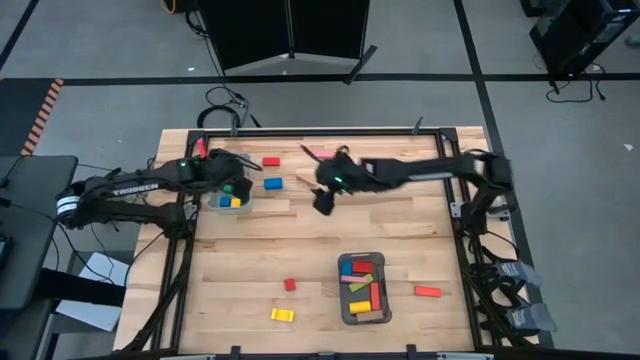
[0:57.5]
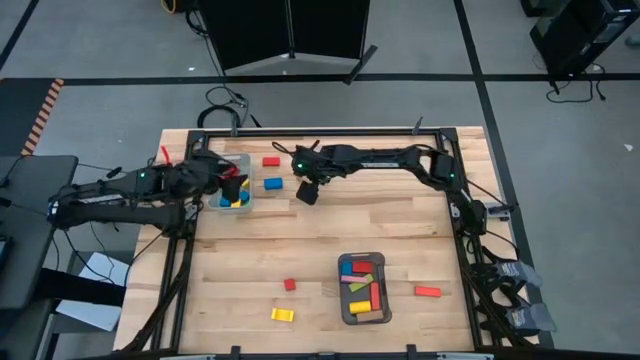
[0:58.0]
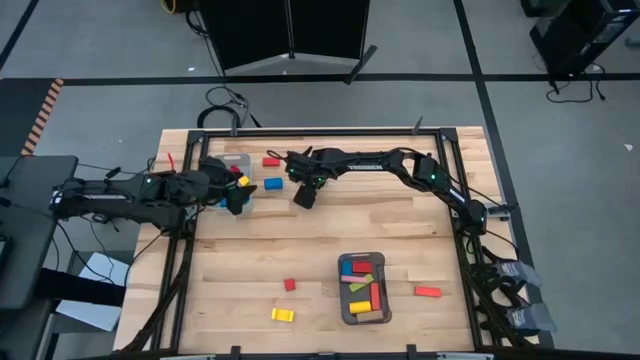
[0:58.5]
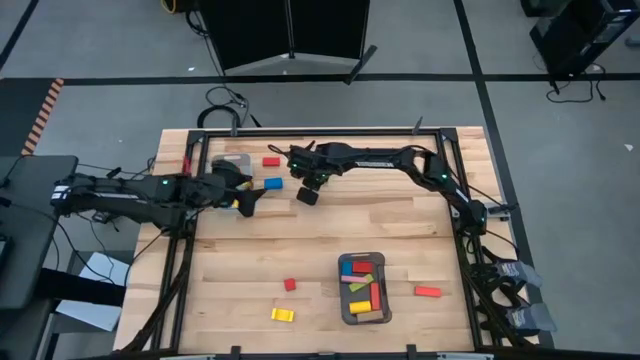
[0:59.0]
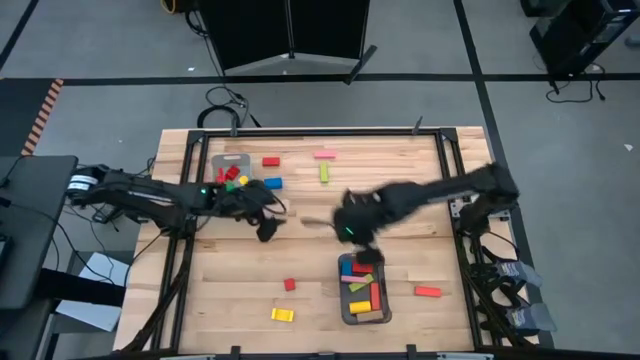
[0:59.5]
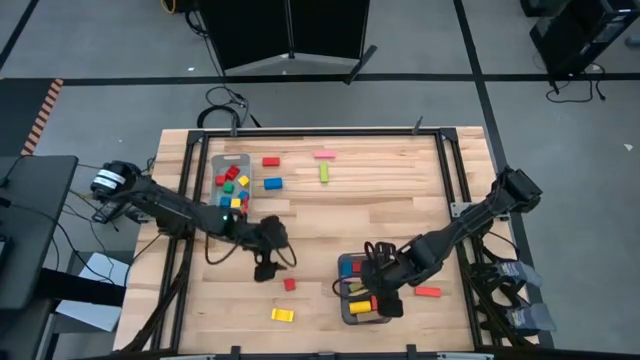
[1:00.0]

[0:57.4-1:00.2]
Task: Sort blocks by size
Put the brown rectangular block into the black bin

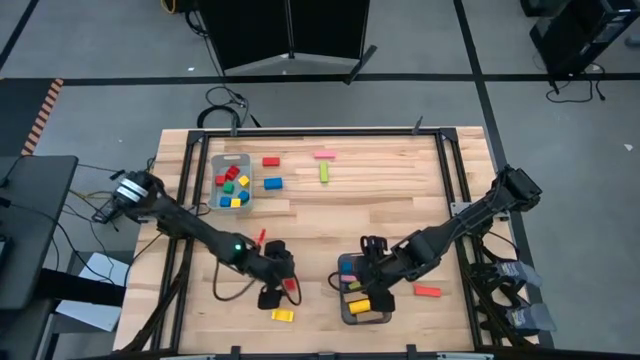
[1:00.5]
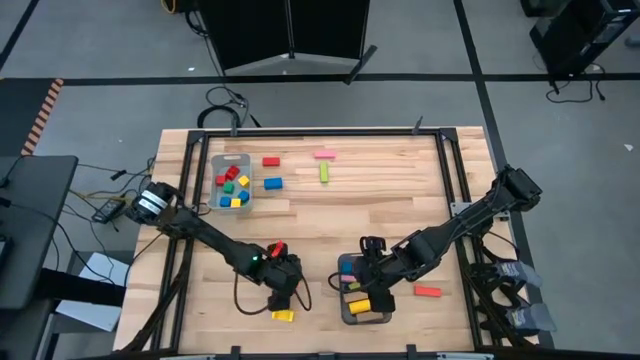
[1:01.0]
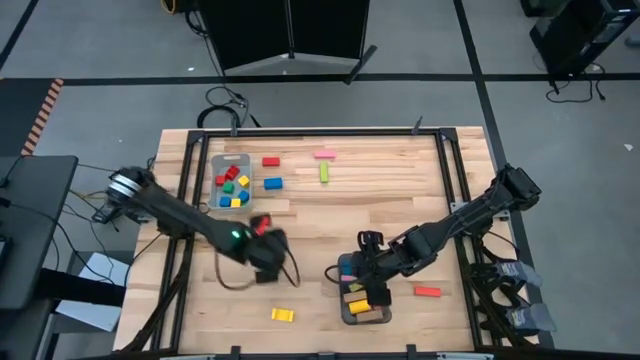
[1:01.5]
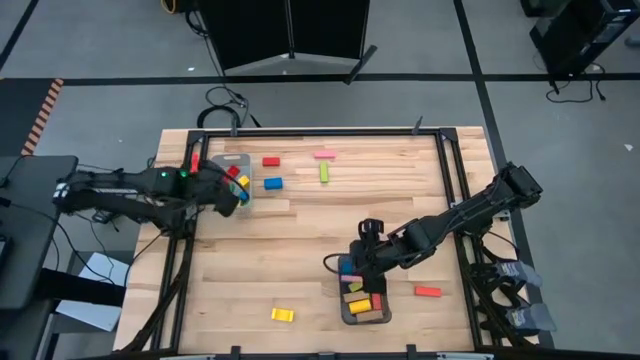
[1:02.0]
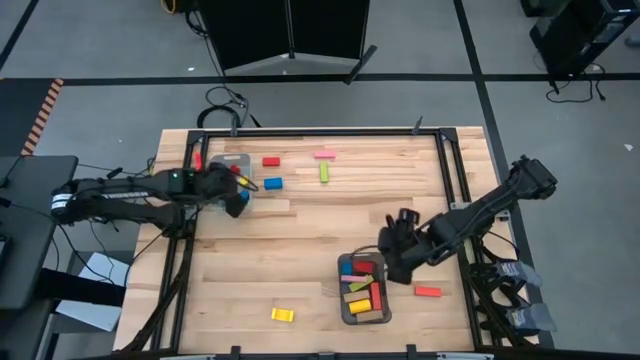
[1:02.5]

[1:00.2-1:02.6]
Put the red cube block into the gray bin

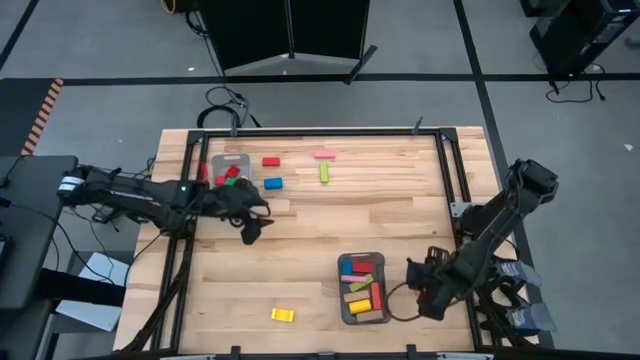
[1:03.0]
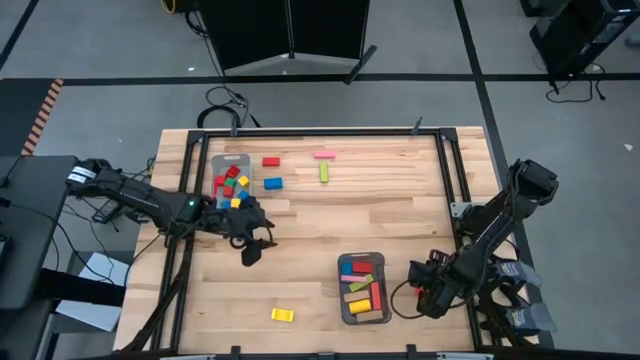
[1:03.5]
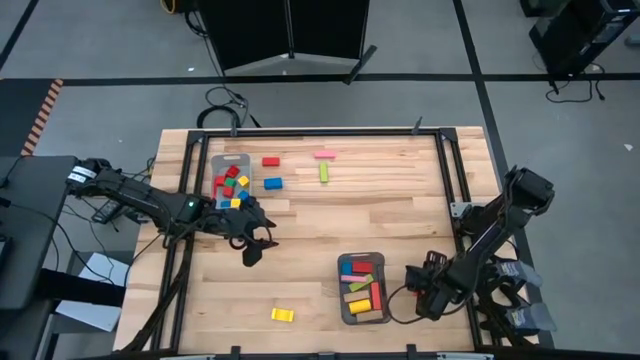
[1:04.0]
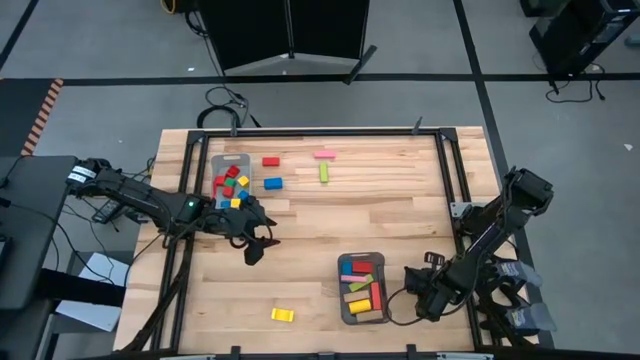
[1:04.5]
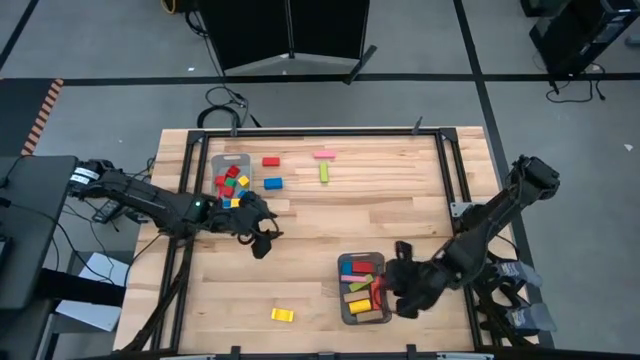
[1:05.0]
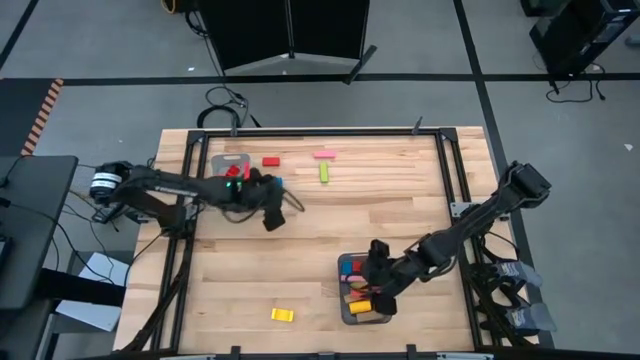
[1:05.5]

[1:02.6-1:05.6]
Put the orange rectangular block into the black bin

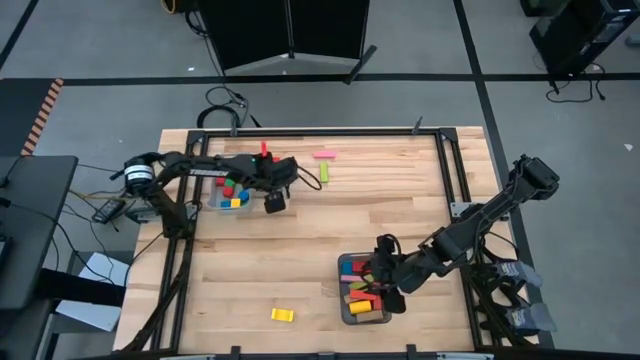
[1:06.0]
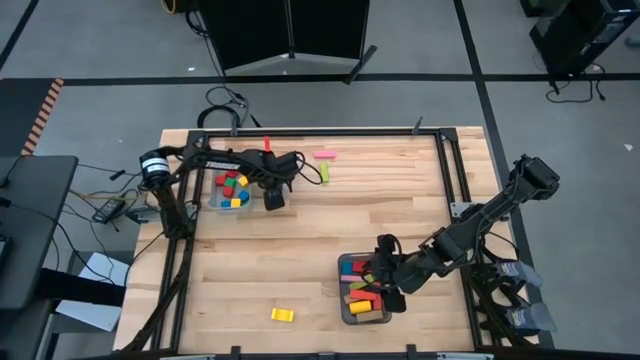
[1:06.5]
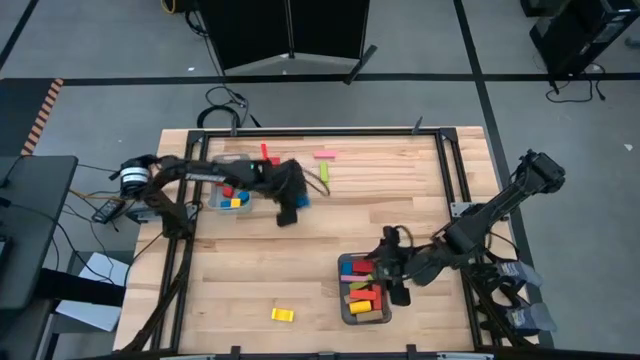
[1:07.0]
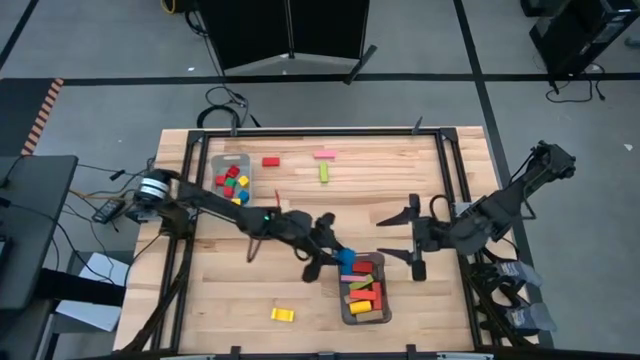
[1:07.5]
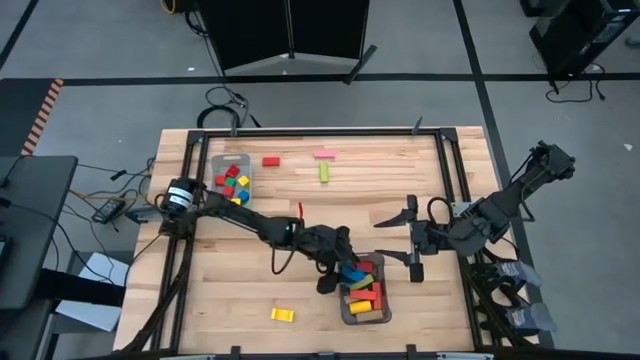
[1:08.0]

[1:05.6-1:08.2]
Put the blue rectangular block into the black bin

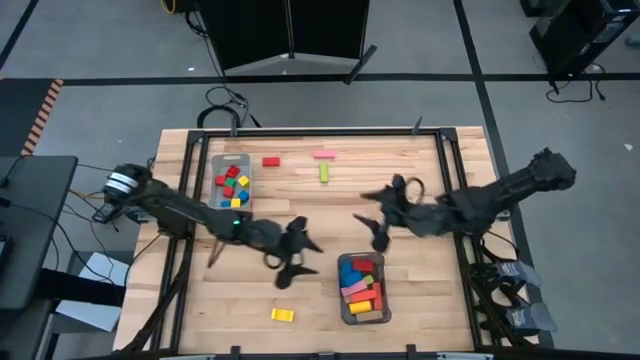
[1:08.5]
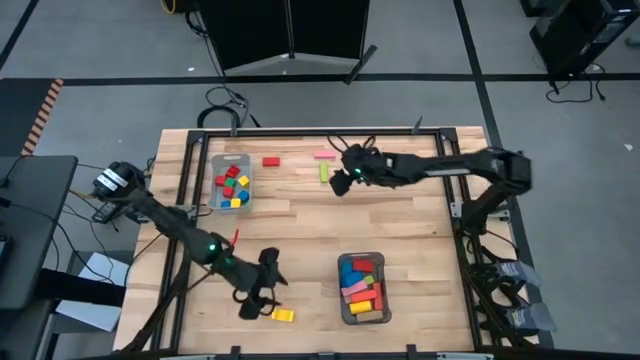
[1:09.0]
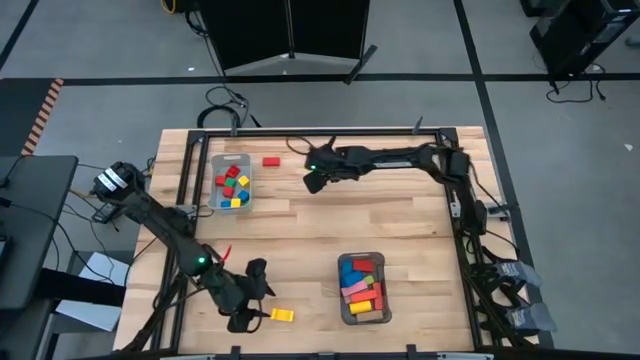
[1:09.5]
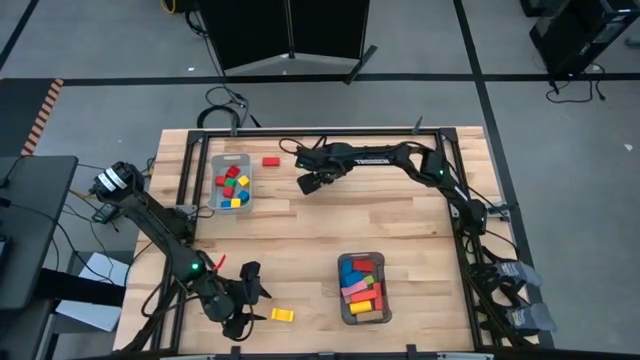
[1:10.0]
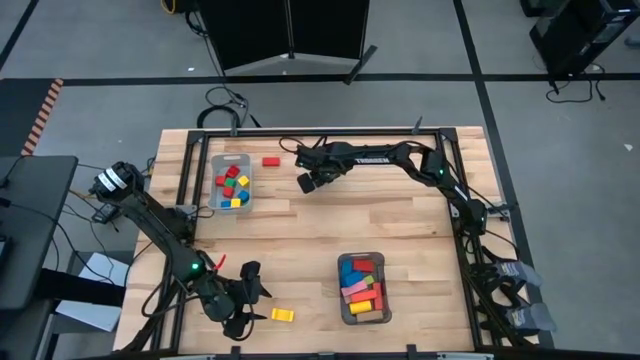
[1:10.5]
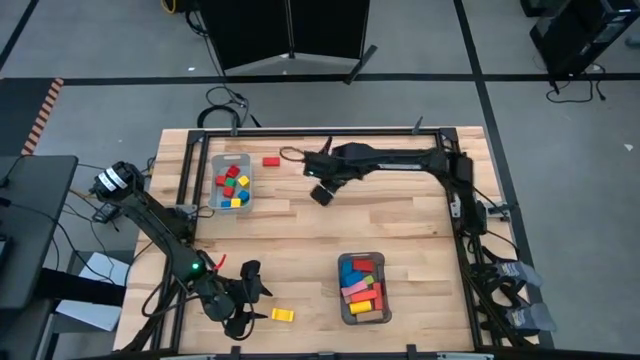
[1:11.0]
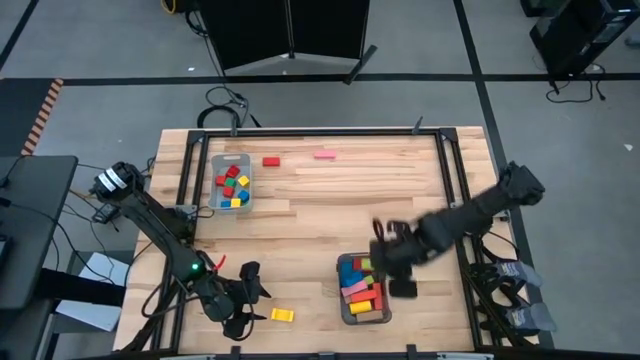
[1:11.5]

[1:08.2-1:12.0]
Put the green rectangular block into the black bin

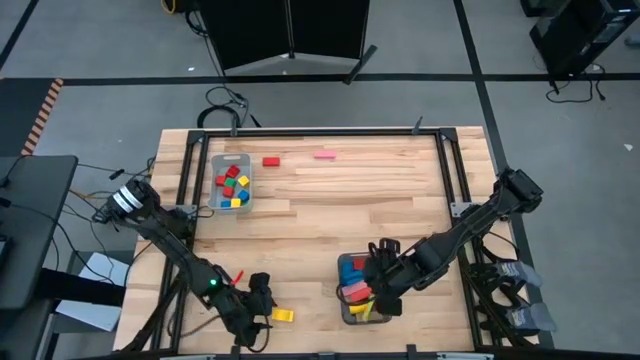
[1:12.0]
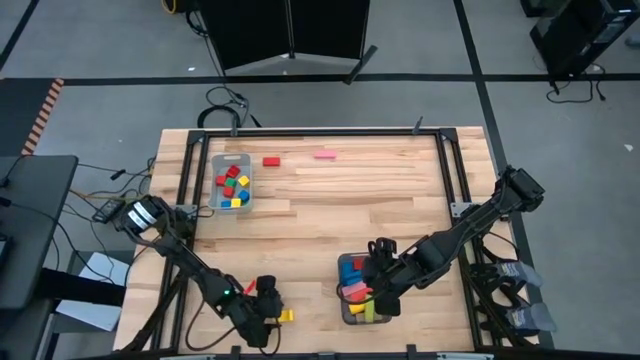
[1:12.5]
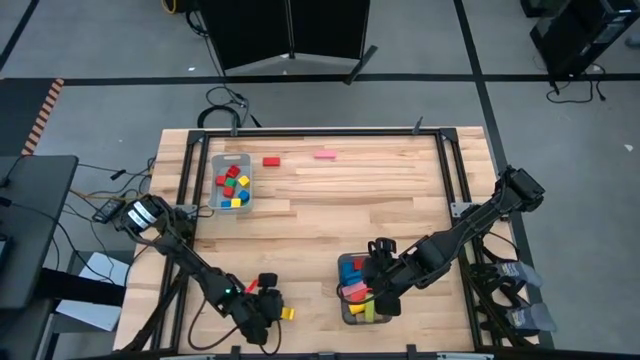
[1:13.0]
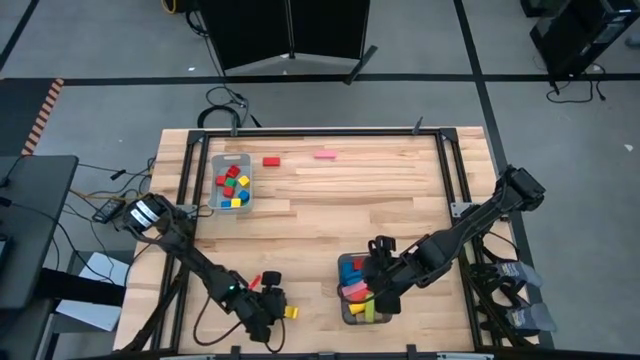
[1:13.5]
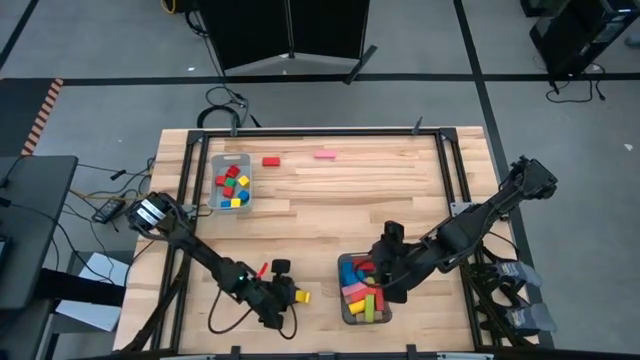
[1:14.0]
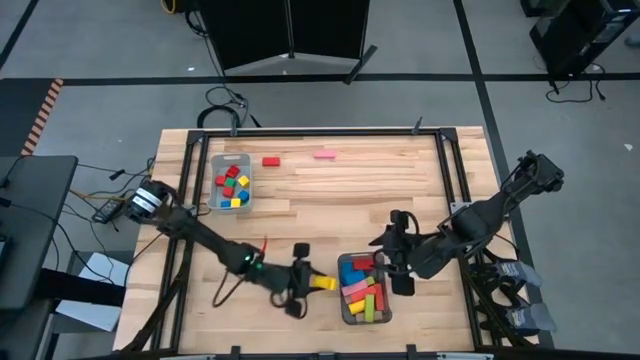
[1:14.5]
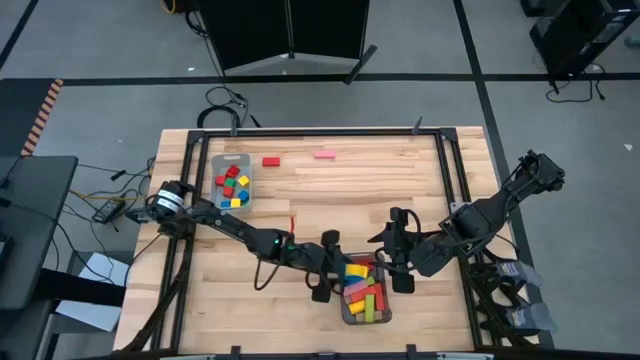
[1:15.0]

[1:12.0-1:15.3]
Put the yellow arch block into the black bin

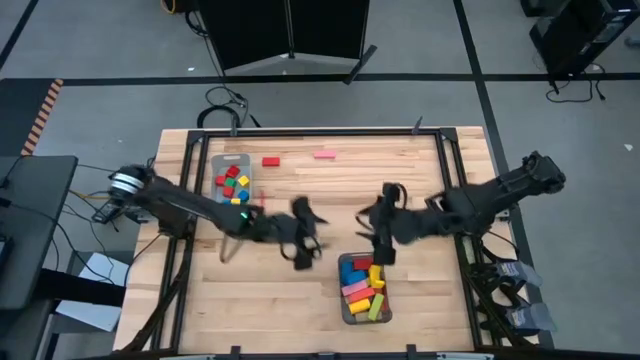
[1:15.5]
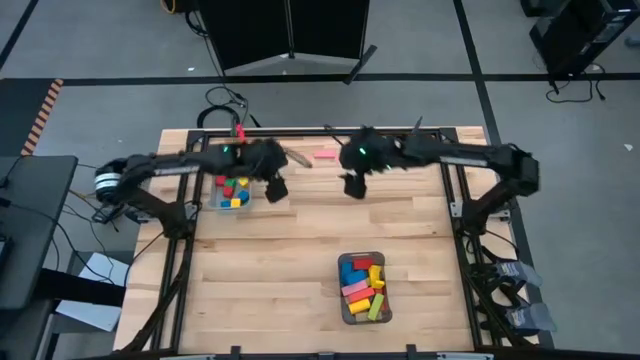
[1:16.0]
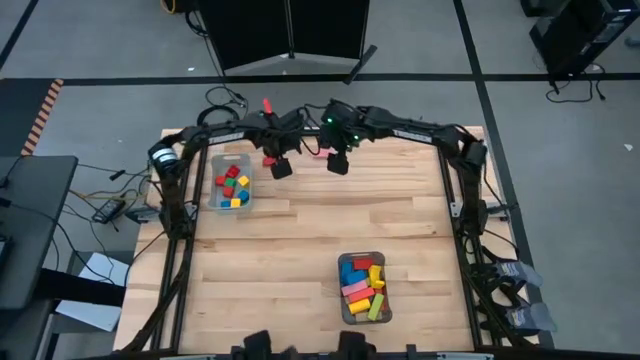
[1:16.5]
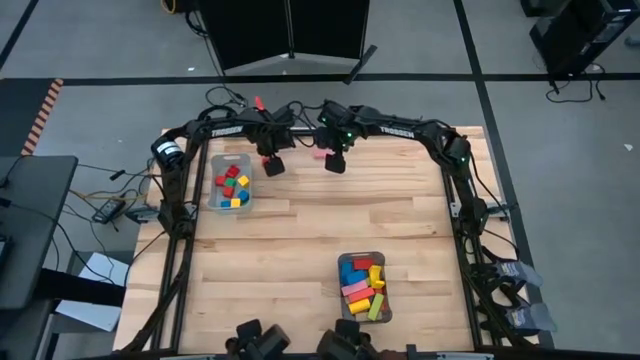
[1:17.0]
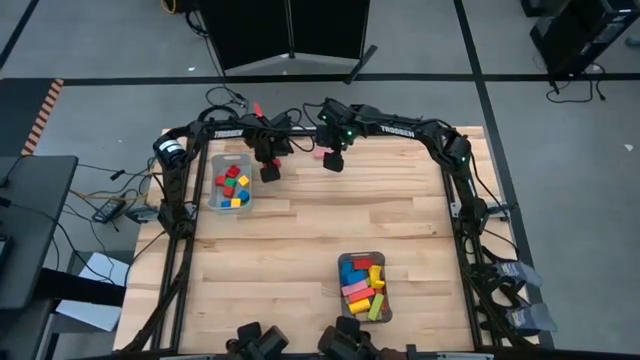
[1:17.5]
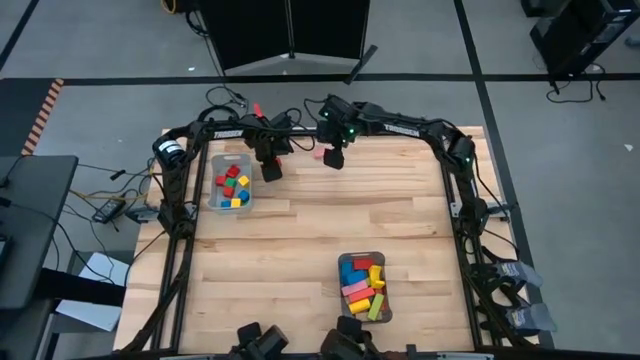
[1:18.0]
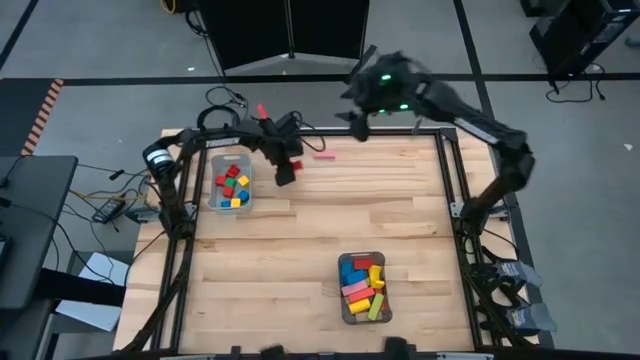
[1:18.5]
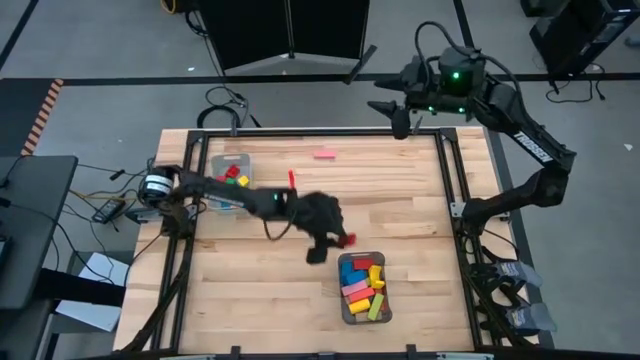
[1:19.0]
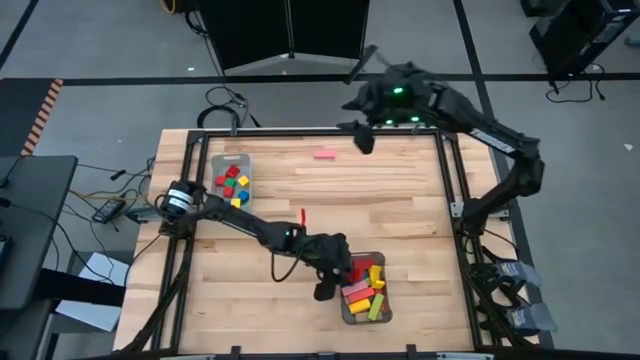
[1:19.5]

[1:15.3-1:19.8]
Put the red rectangular block into the black bin

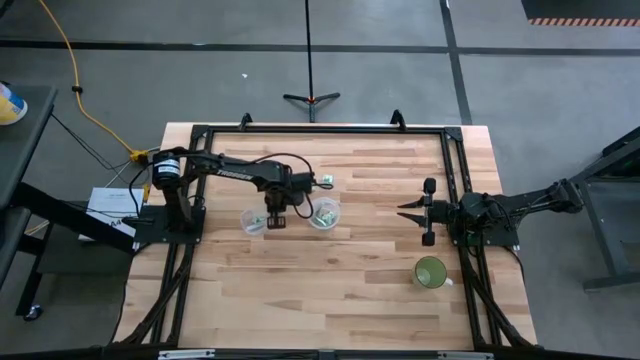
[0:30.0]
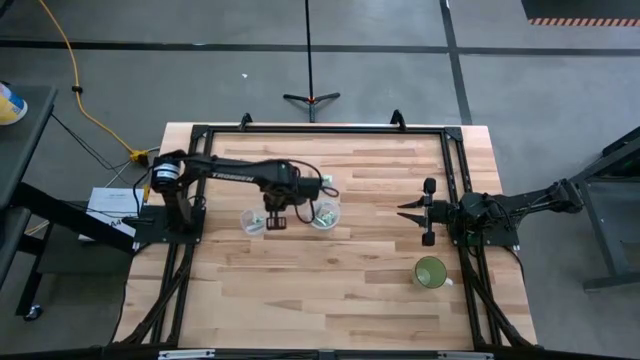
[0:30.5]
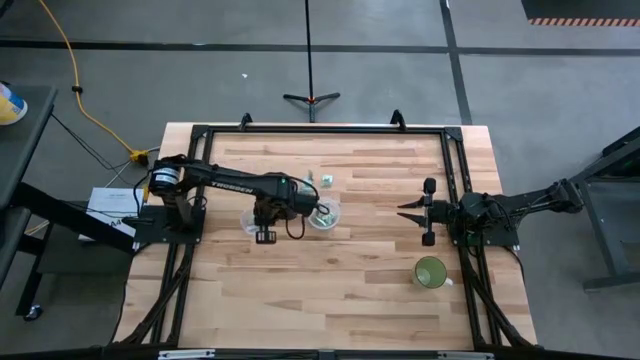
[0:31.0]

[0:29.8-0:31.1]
Task: Pick and place Stevia / Truvia into bins
Put the white stevia packet into the left transparent container
